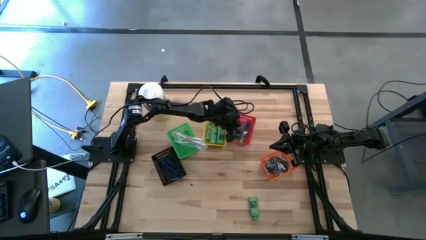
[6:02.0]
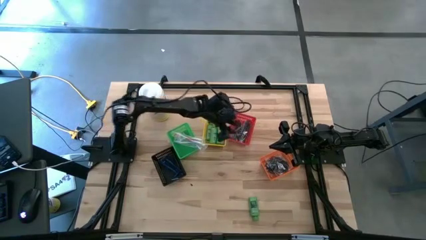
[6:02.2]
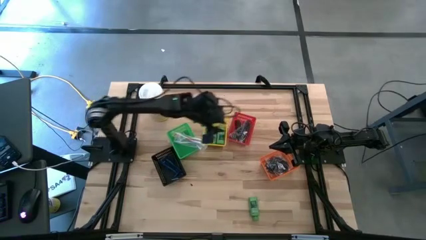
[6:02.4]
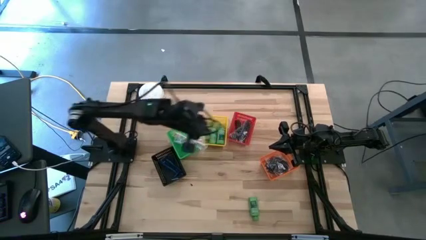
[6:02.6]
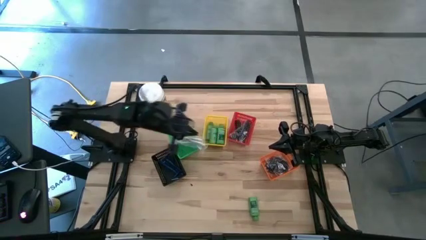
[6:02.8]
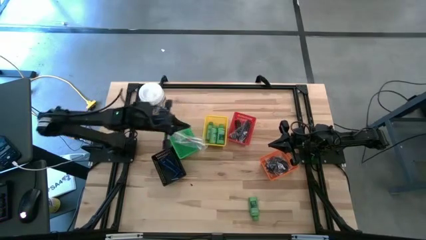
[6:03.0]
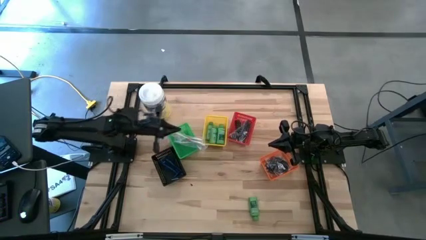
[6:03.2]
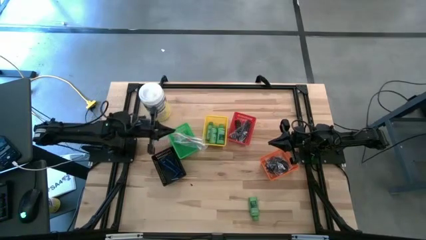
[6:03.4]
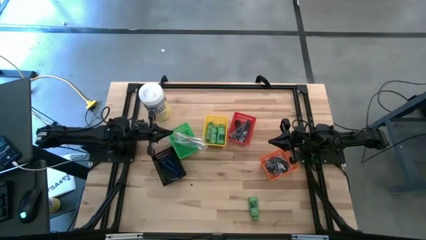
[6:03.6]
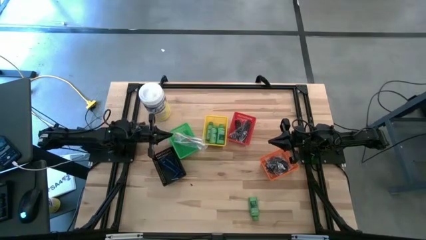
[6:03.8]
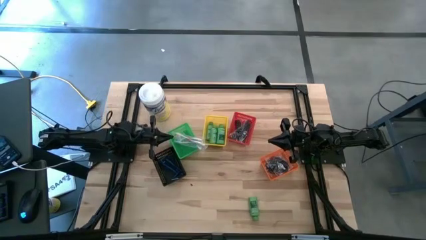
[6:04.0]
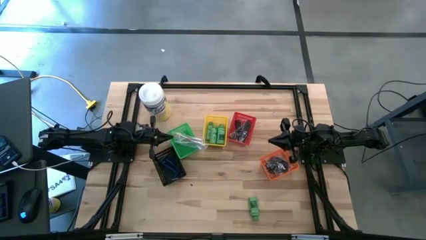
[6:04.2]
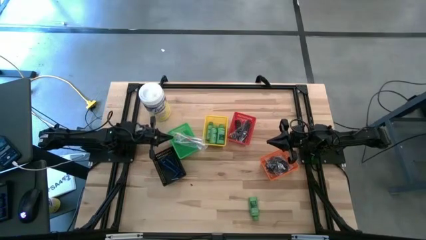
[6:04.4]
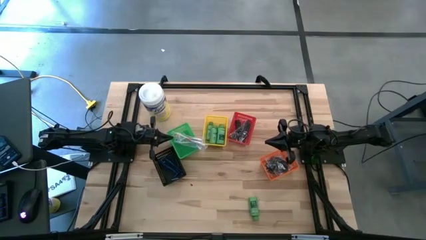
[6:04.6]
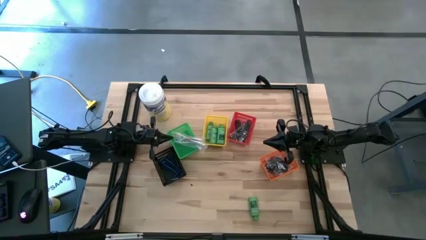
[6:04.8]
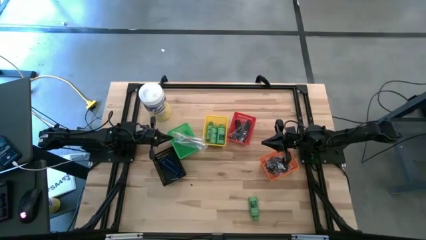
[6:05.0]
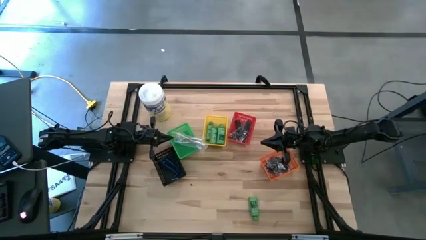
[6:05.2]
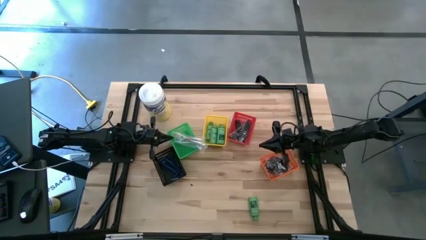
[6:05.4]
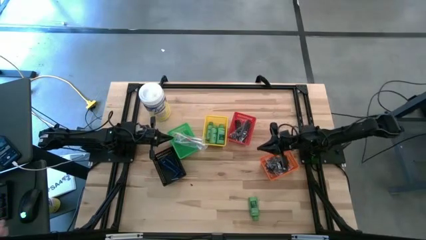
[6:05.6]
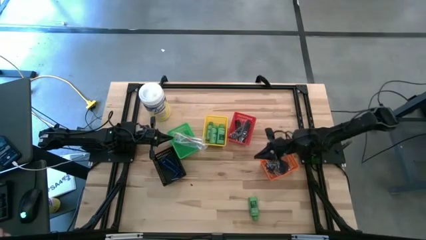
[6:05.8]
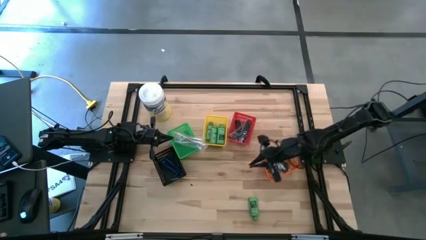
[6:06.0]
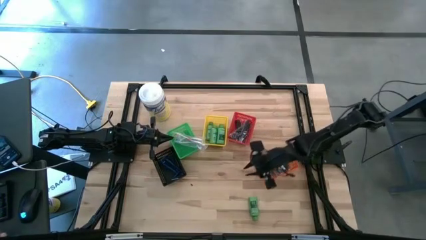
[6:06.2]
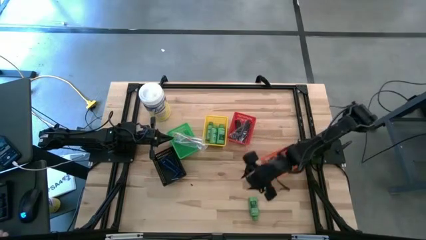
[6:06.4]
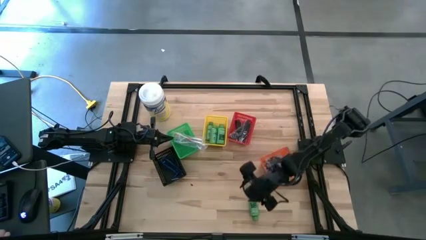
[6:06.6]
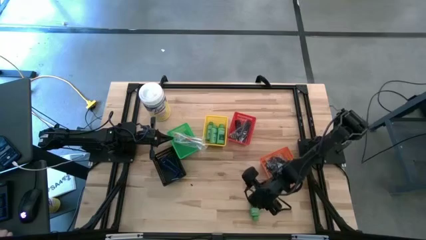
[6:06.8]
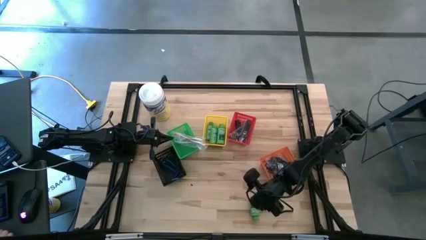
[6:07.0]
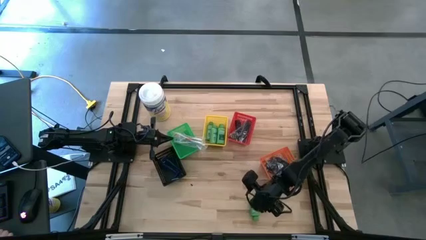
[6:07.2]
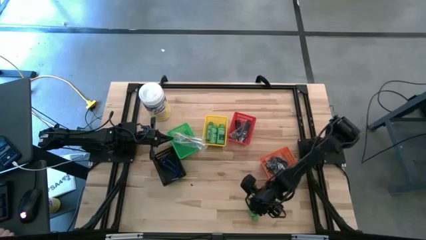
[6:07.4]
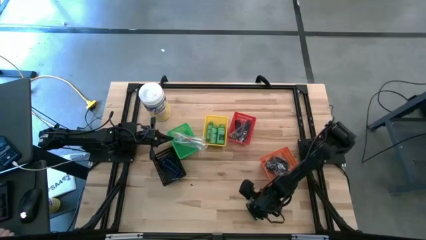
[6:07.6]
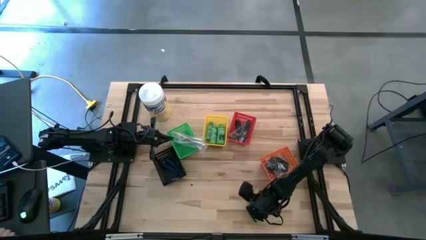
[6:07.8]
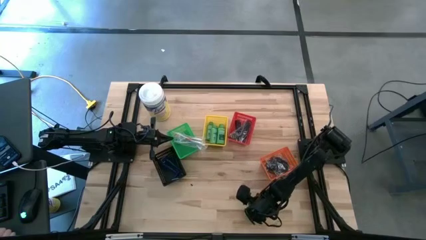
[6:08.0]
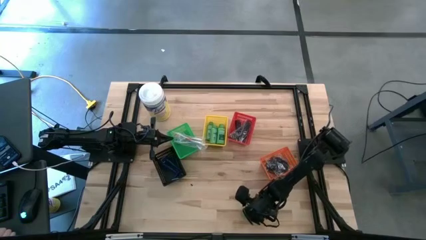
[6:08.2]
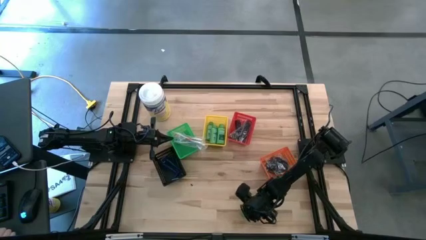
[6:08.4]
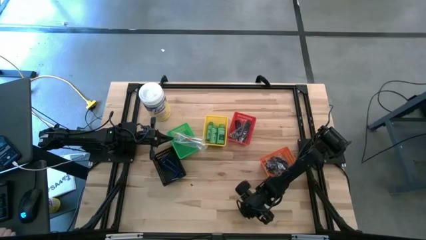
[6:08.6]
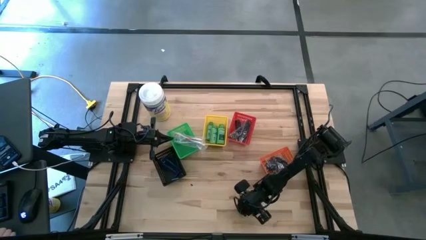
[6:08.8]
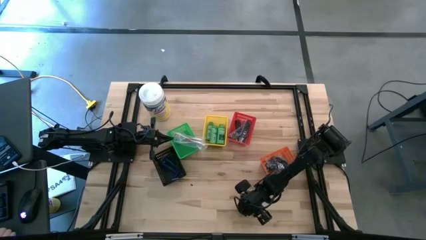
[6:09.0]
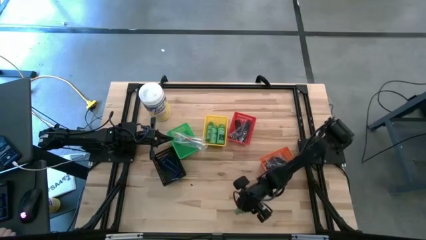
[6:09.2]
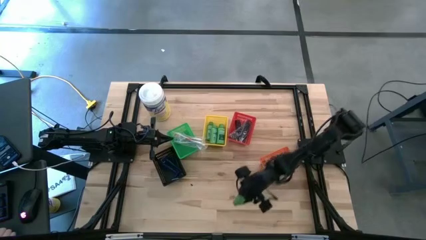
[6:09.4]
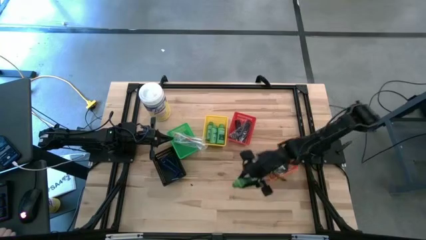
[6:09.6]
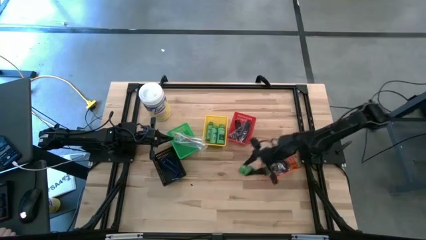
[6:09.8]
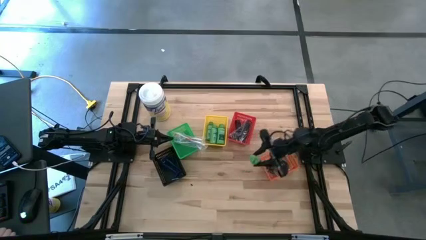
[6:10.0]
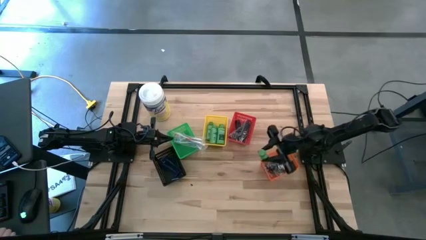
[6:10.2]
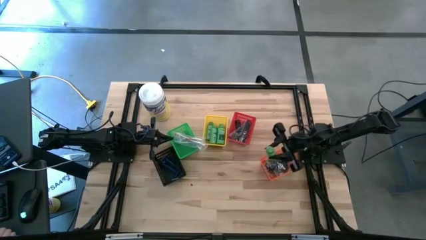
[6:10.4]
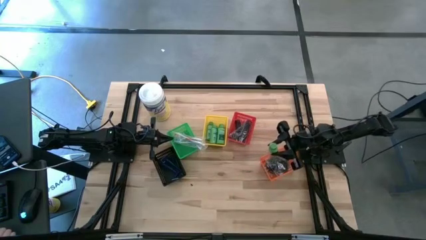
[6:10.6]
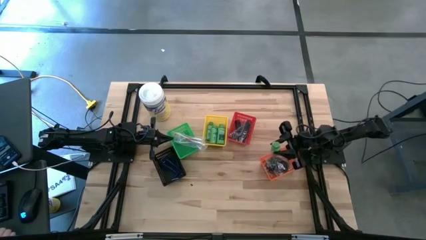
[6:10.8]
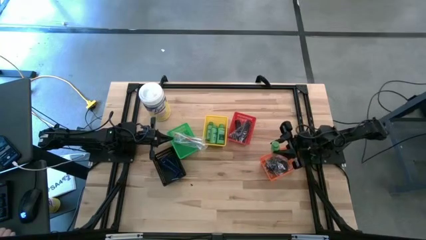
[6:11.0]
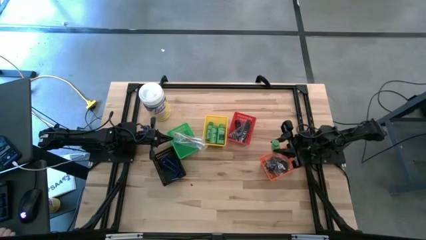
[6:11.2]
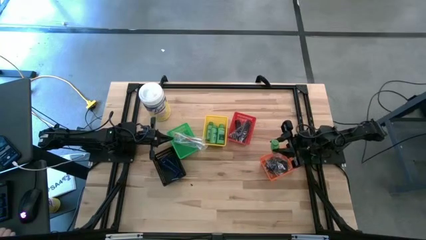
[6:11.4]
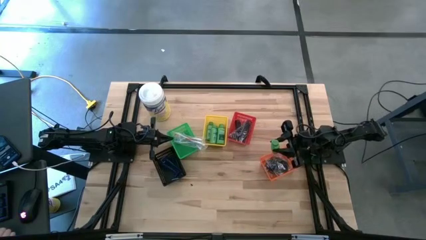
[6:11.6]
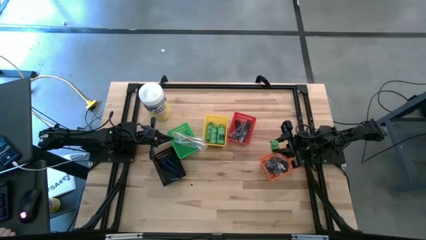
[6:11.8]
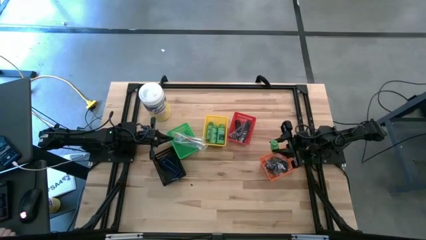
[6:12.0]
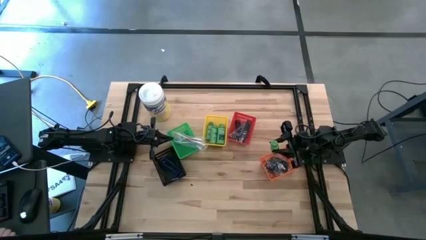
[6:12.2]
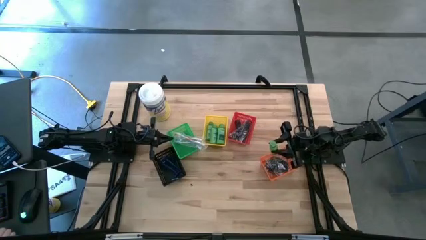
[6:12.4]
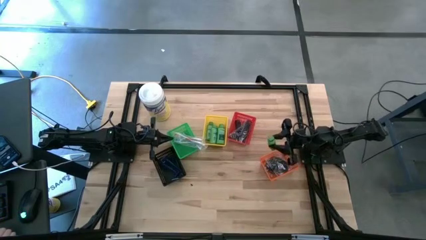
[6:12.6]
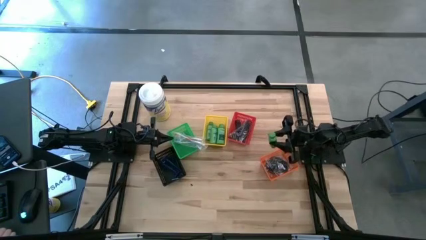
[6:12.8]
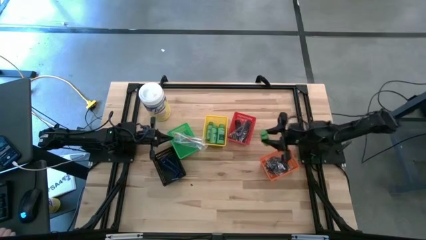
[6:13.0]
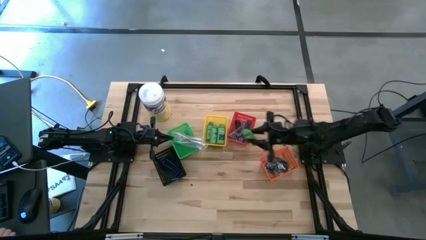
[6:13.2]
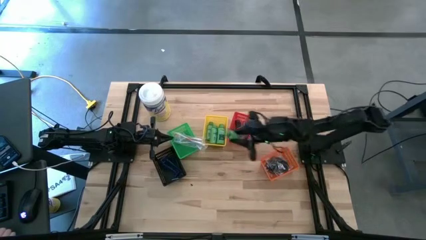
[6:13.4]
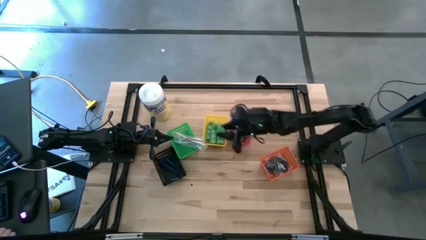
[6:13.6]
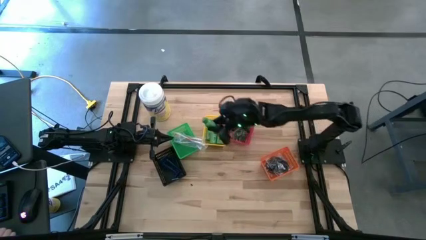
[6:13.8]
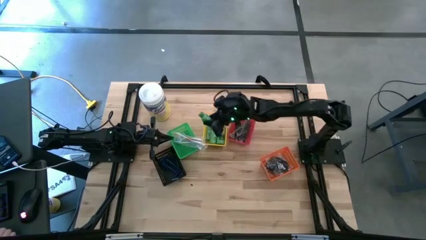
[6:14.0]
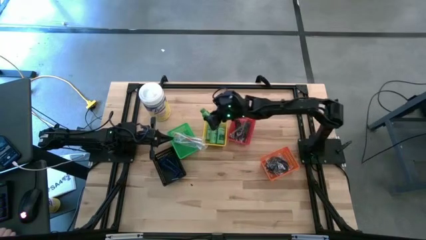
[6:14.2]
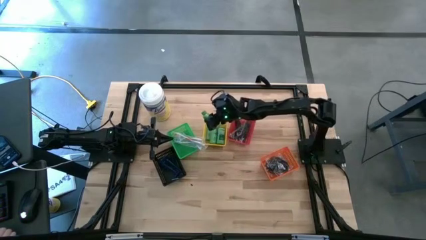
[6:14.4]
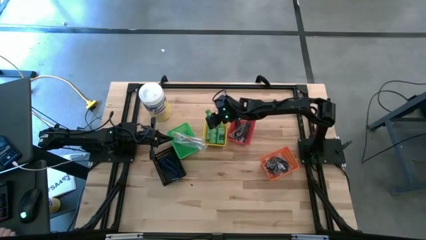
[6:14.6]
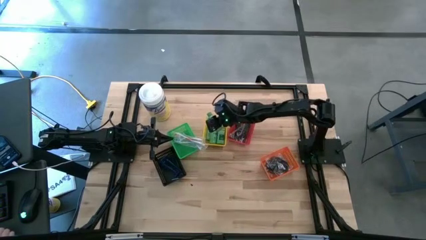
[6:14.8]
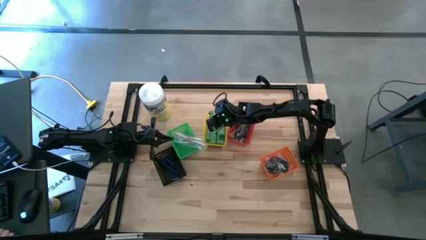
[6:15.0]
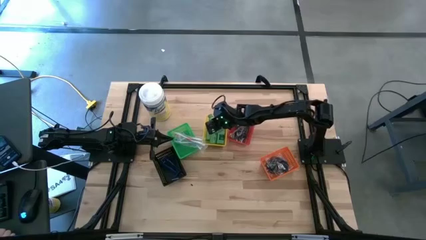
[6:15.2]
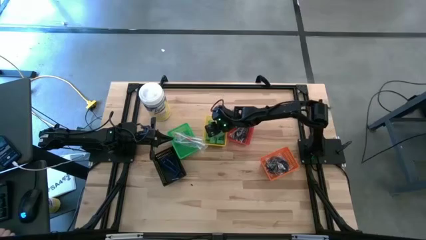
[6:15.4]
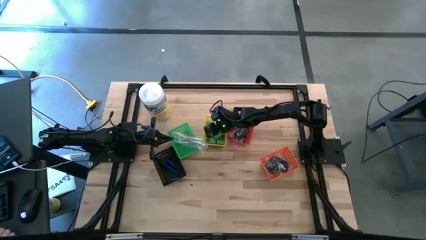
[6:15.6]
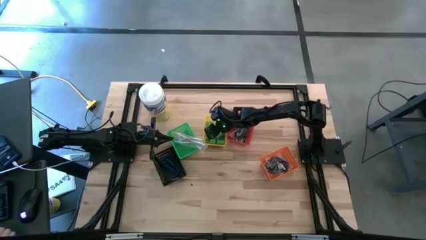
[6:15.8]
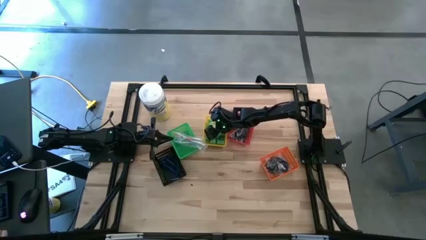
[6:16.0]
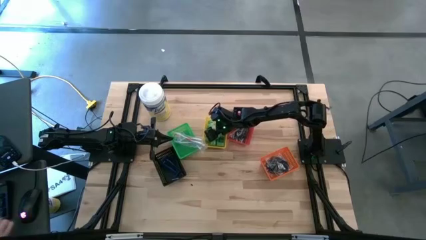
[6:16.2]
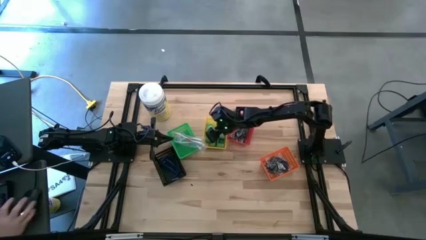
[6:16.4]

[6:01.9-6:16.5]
Task: Pick & Place Travel size toiletries
Put the green shampoo into the yellow bin
